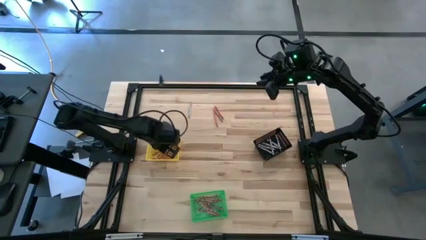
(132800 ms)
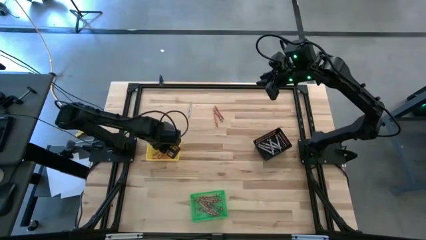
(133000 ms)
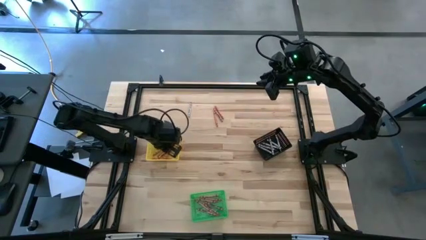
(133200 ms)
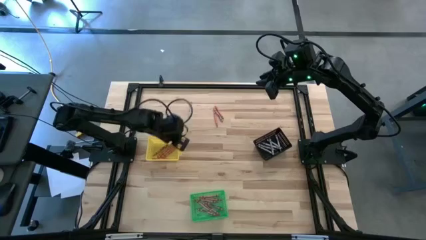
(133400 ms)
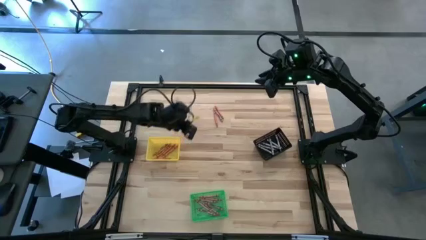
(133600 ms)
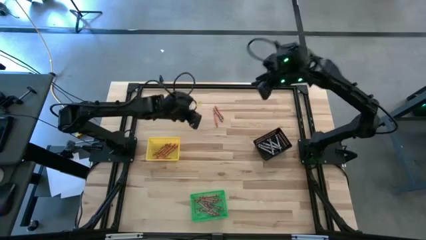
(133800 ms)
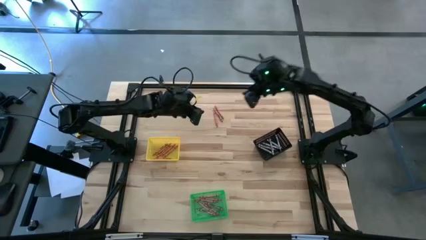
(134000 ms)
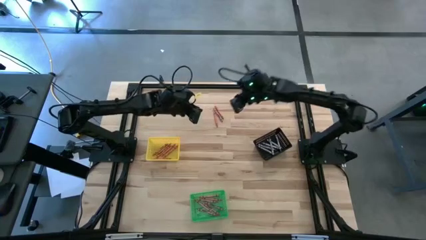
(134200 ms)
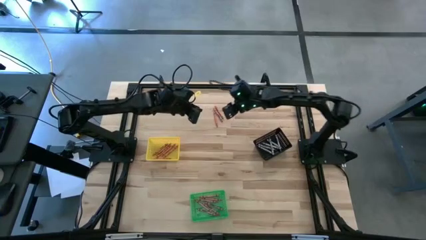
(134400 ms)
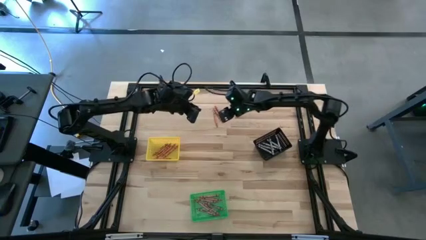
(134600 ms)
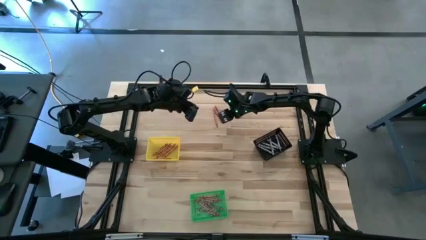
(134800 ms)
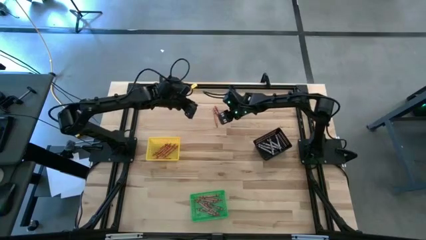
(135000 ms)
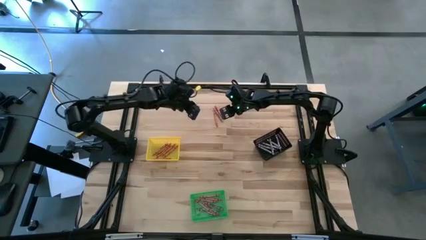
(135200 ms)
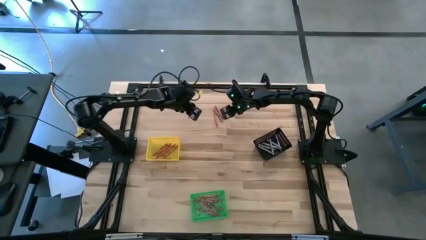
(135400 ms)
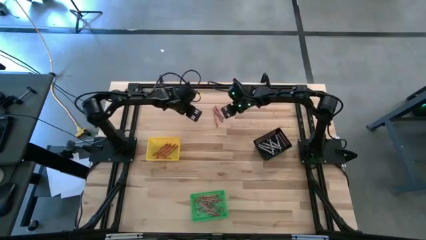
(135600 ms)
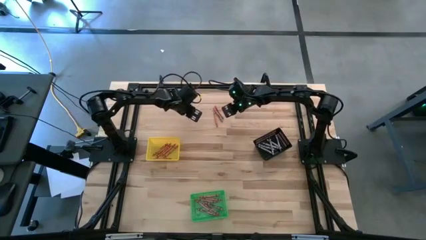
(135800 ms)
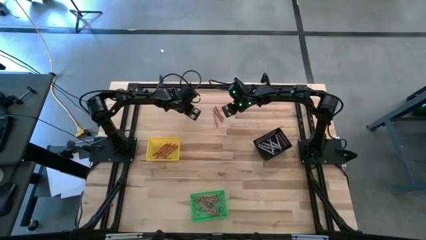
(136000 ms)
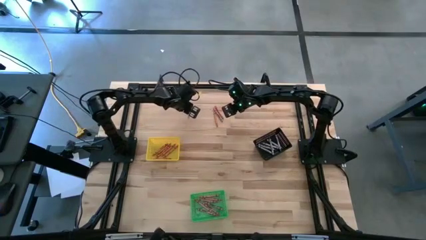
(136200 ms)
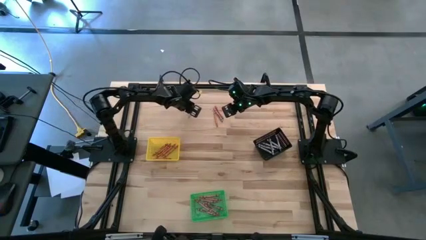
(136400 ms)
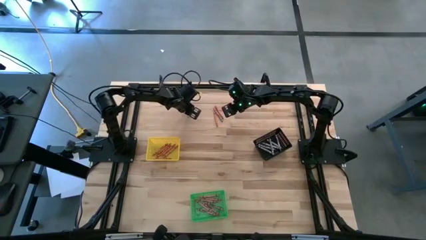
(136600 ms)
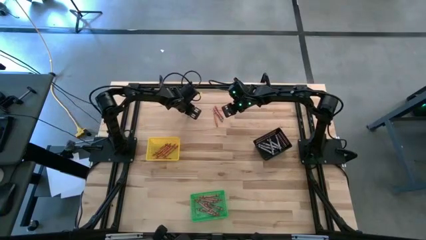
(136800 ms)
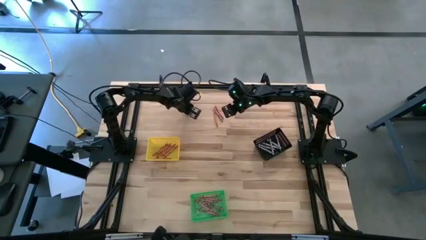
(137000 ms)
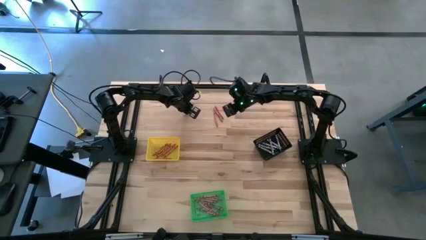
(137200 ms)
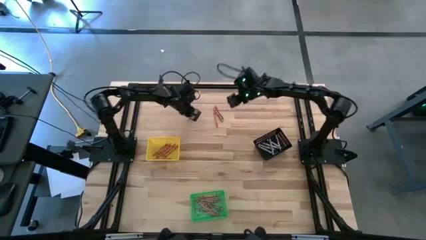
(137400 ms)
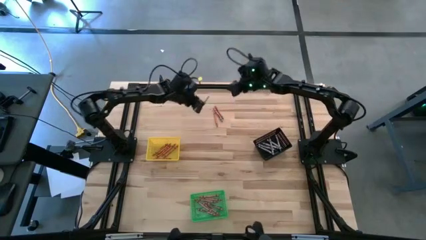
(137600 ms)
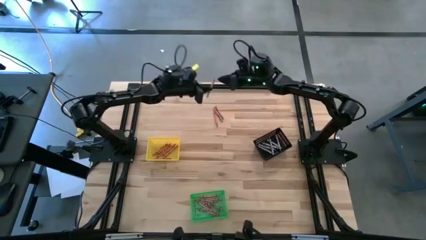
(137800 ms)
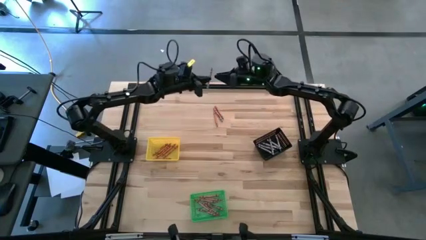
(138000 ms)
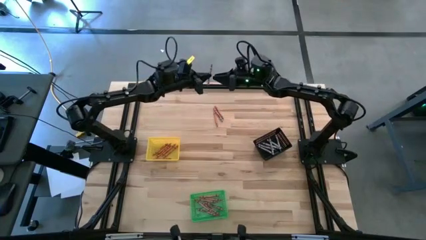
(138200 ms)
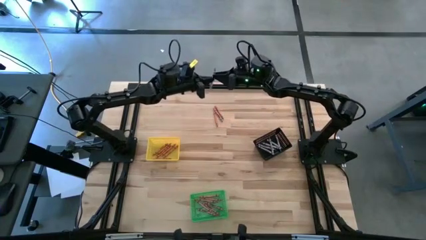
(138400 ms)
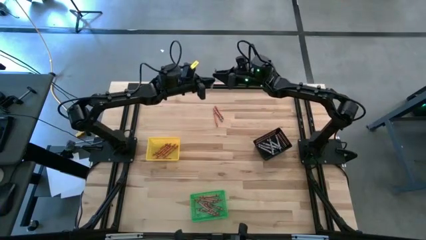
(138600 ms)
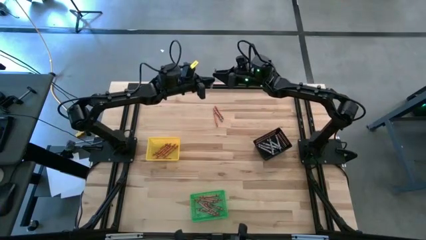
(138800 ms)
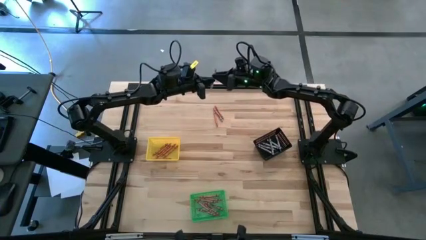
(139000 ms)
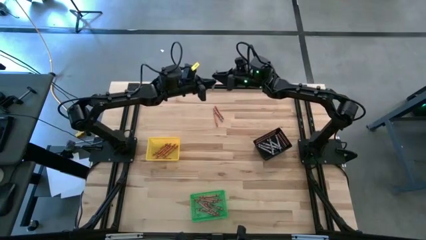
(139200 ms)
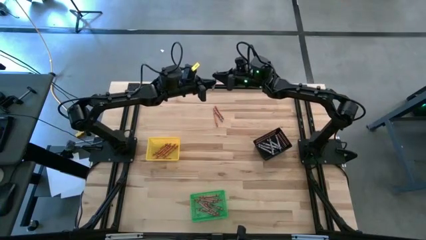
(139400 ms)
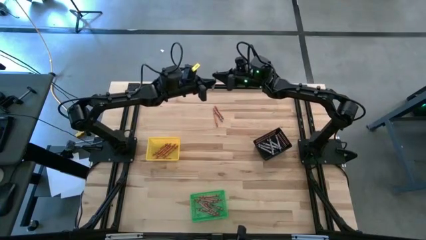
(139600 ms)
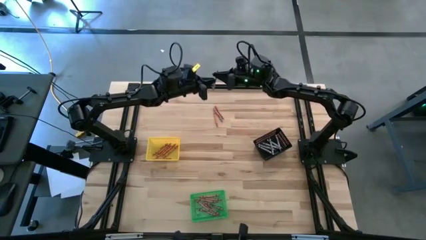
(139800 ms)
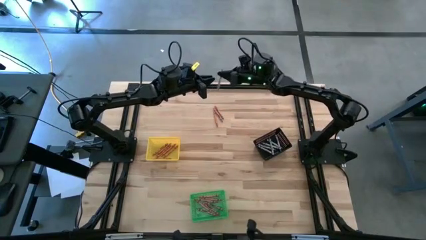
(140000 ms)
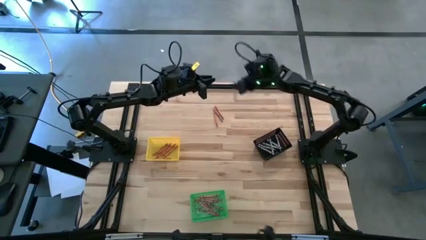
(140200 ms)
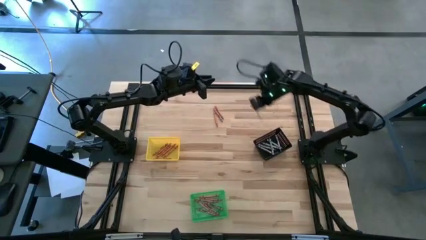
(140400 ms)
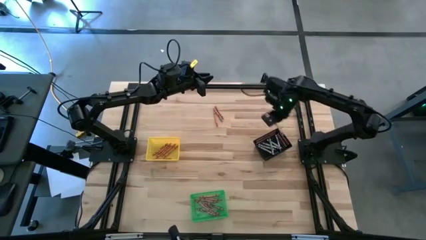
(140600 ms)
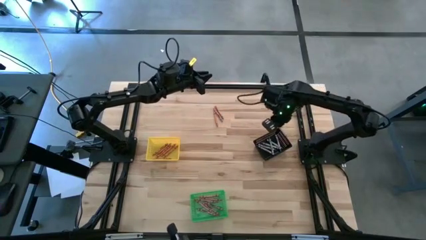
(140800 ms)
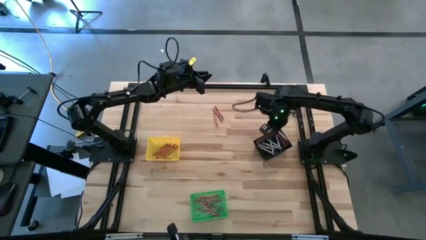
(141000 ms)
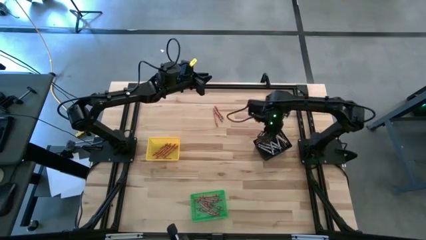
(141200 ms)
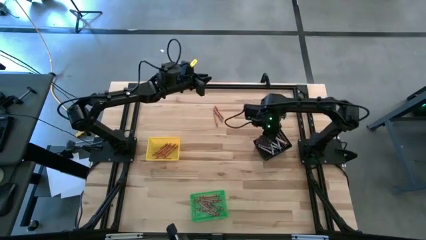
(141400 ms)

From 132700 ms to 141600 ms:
Task: Sort crayons
Put the gray crayon into the black bin

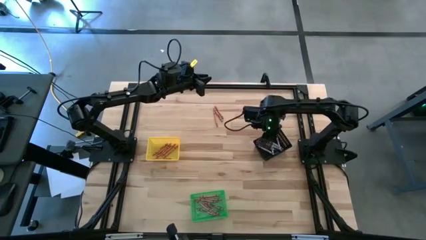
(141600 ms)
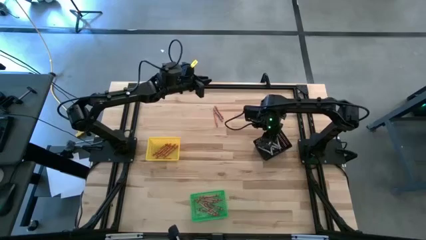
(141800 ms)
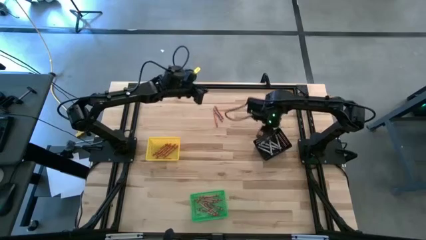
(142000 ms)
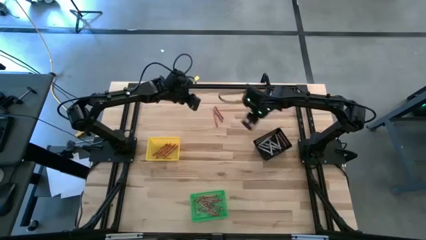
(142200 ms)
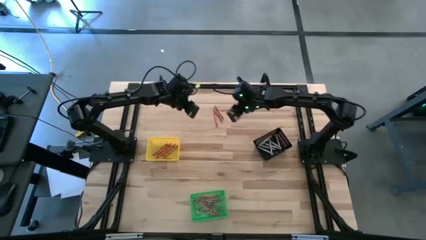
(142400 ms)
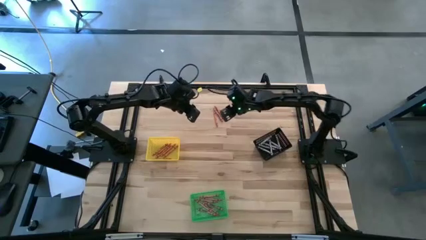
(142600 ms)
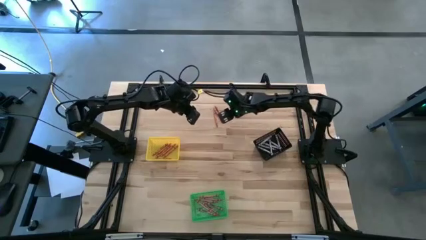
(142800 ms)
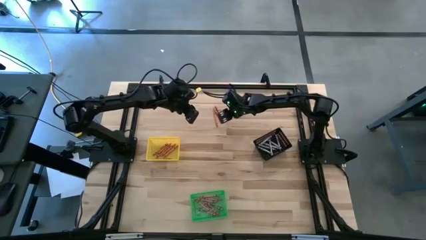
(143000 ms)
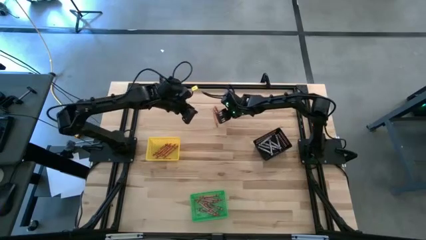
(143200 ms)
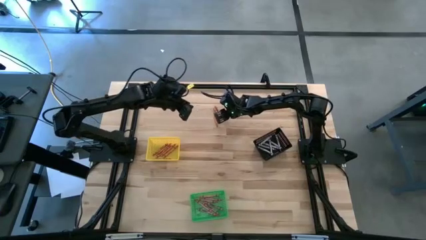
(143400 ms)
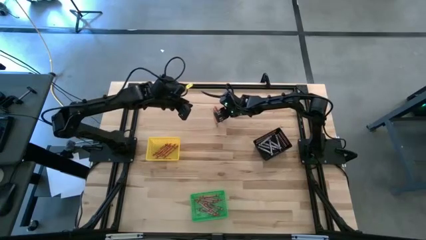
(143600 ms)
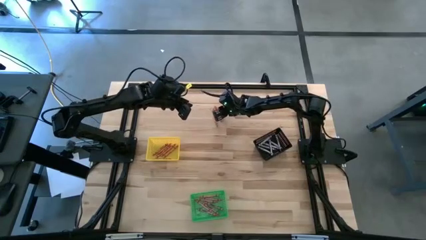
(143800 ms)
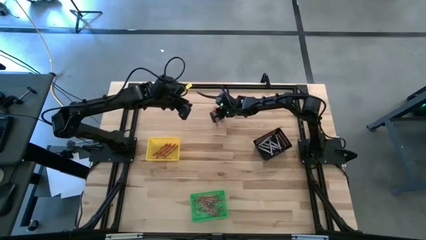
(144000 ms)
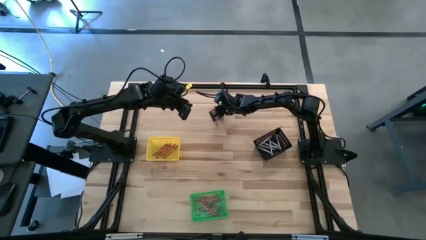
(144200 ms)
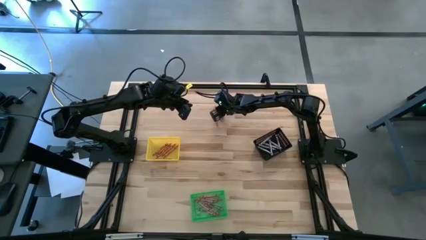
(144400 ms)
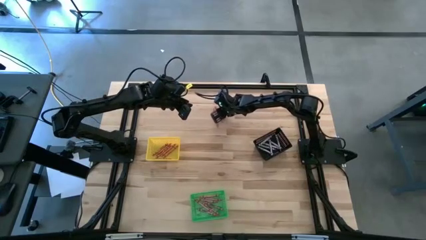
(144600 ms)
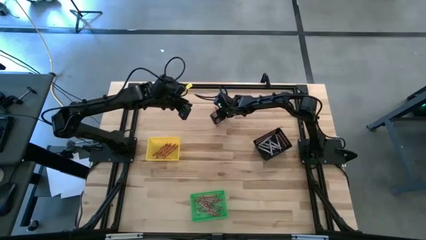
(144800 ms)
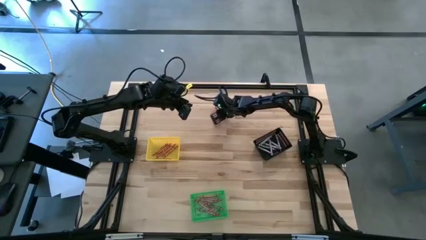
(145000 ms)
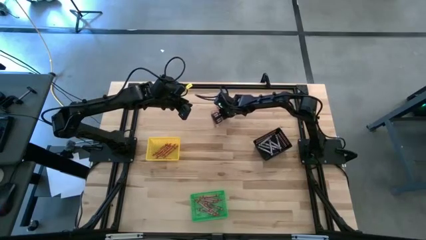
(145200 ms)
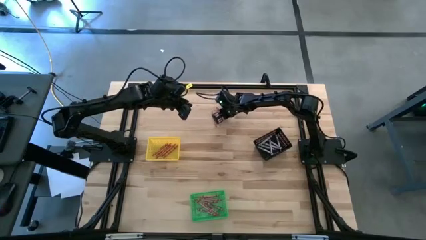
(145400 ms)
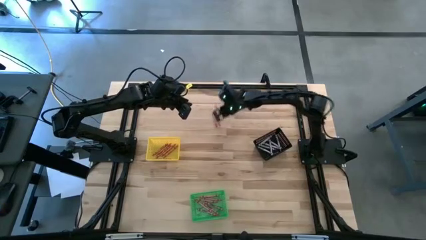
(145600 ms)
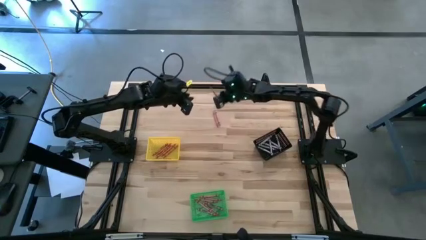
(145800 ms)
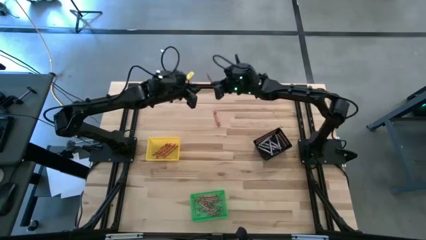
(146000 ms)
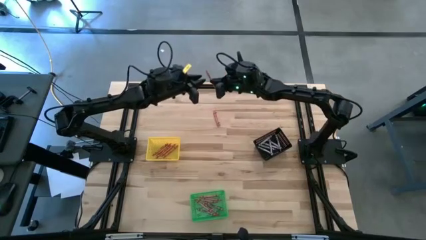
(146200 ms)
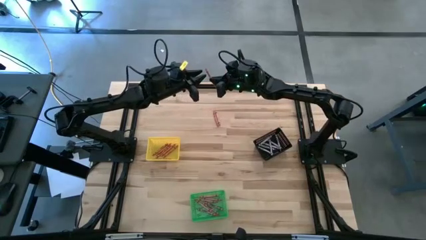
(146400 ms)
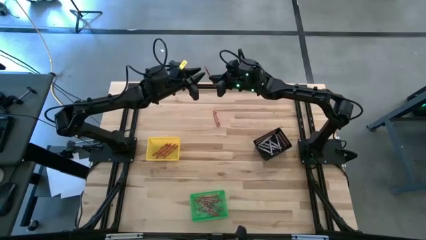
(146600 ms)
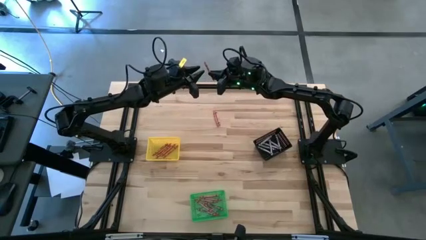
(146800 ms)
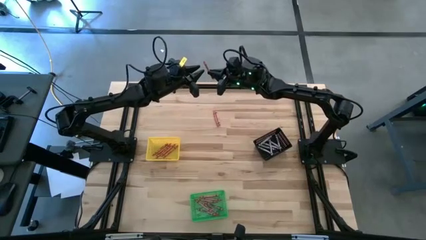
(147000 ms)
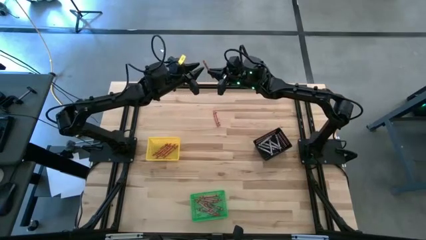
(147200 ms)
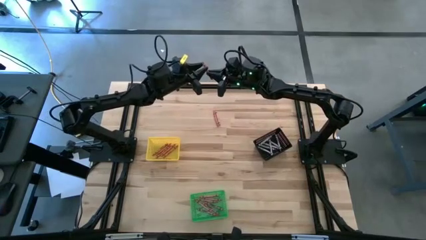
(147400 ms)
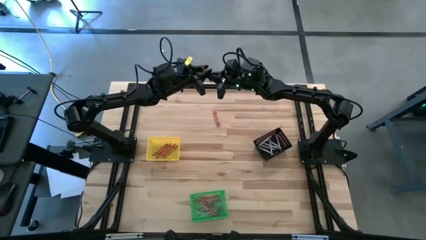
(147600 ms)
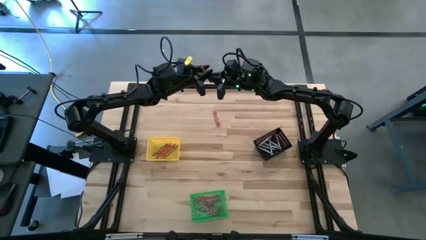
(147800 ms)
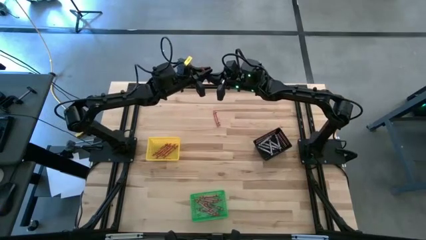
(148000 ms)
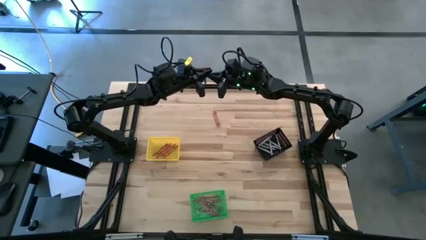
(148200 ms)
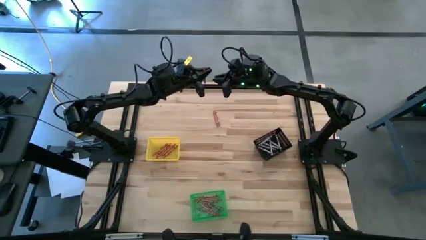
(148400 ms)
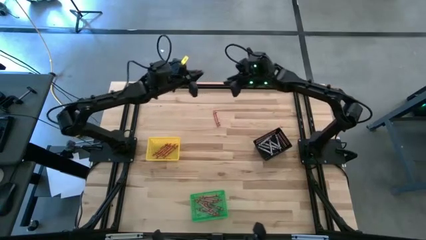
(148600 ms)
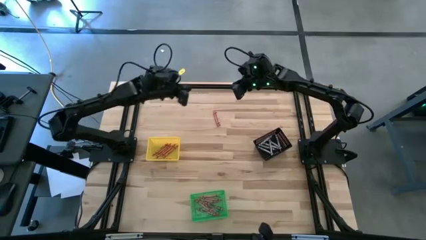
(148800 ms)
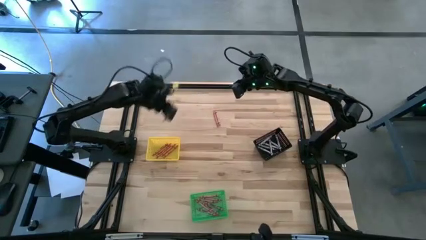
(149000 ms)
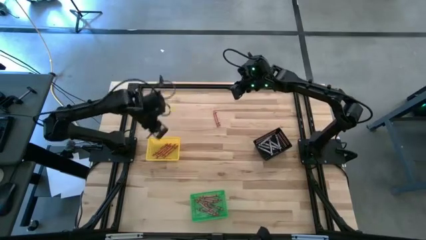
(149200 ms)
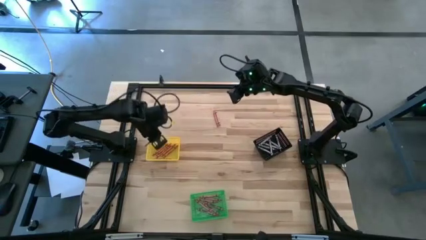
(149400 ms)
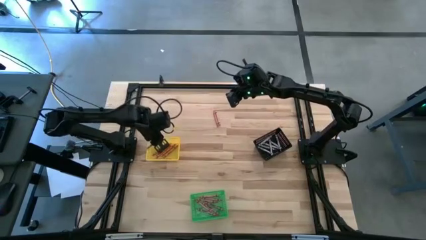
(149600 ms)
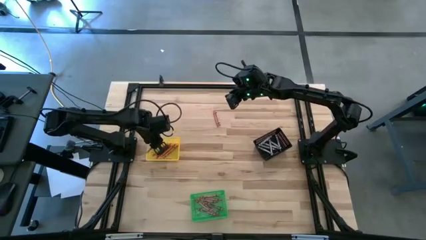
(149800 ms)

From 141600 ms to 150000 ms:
Put the right orange crayon into the yellow bin
